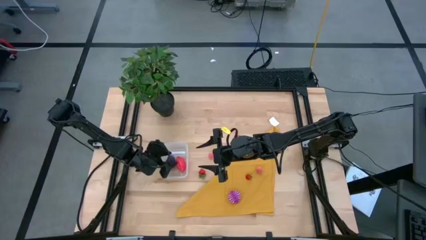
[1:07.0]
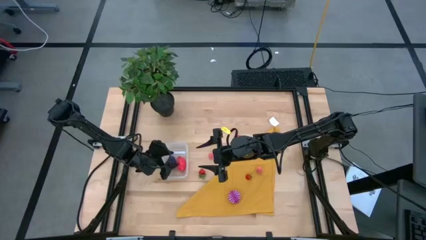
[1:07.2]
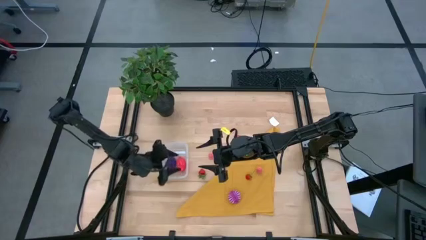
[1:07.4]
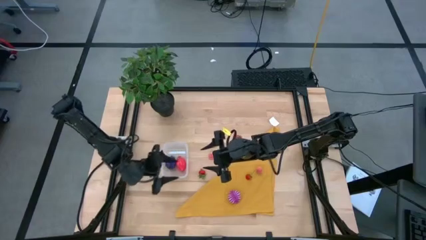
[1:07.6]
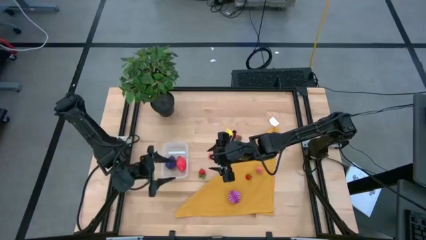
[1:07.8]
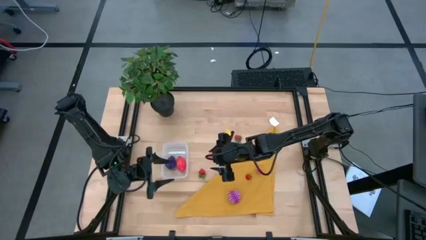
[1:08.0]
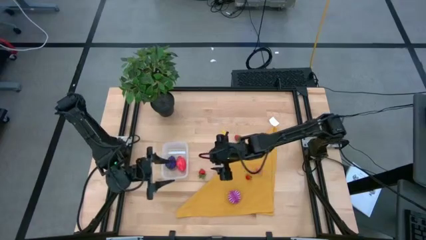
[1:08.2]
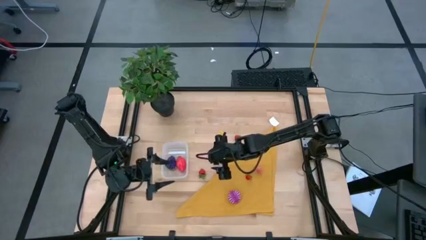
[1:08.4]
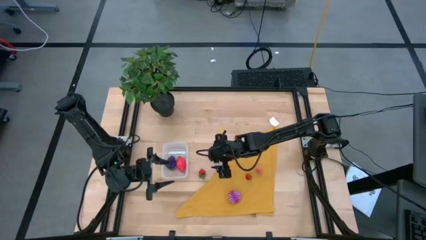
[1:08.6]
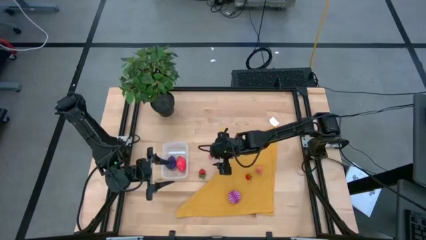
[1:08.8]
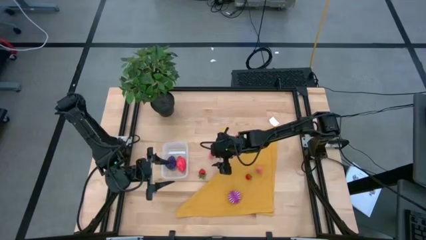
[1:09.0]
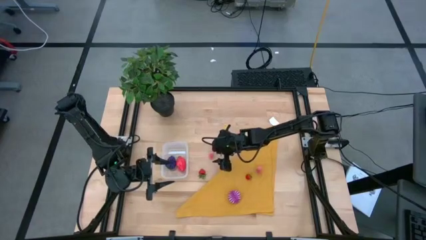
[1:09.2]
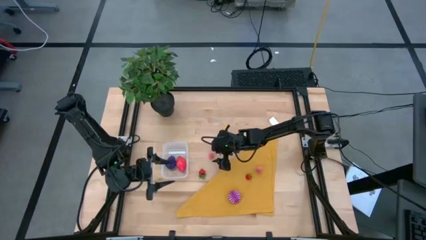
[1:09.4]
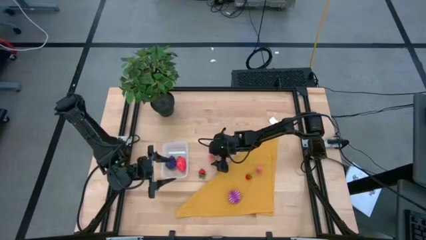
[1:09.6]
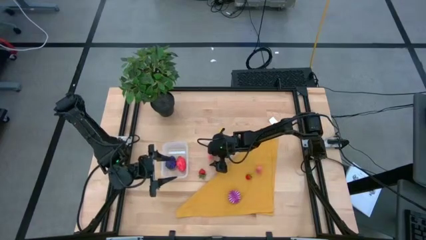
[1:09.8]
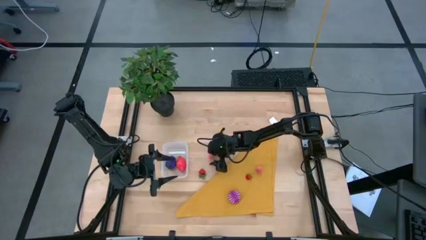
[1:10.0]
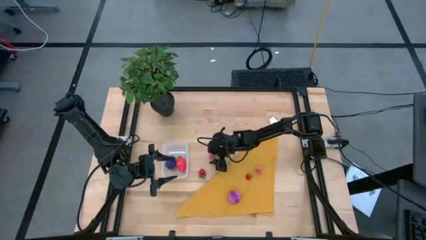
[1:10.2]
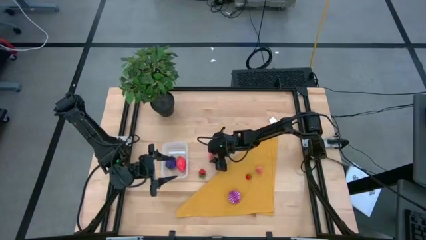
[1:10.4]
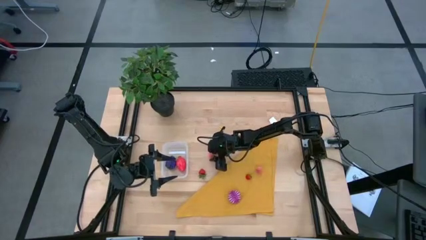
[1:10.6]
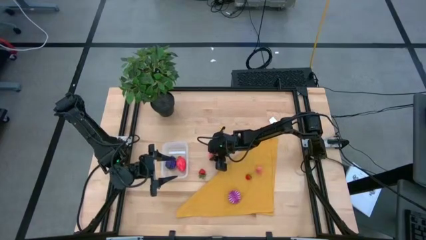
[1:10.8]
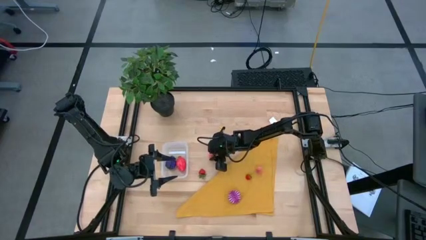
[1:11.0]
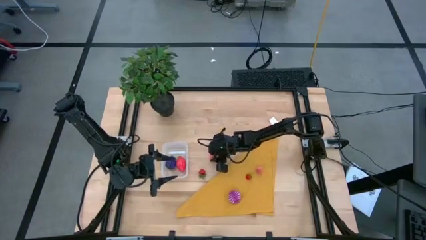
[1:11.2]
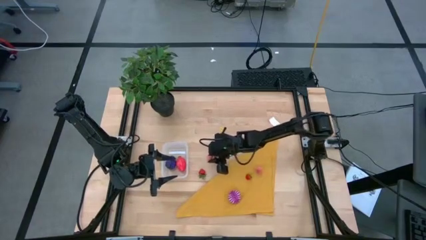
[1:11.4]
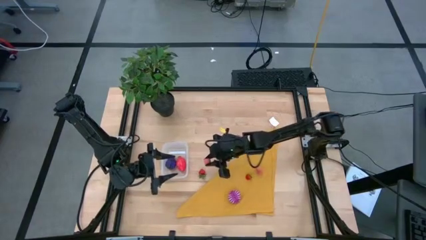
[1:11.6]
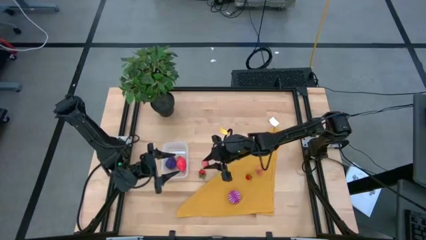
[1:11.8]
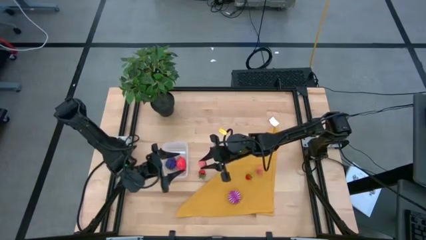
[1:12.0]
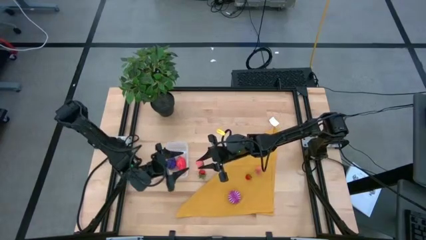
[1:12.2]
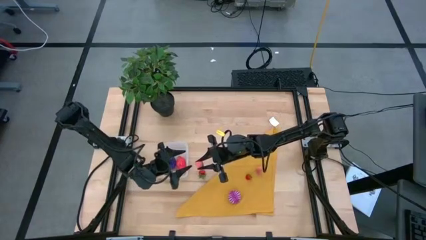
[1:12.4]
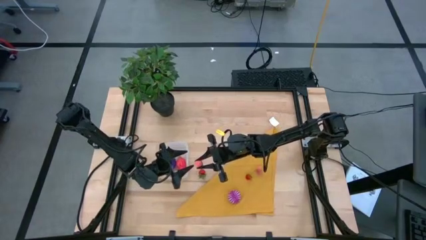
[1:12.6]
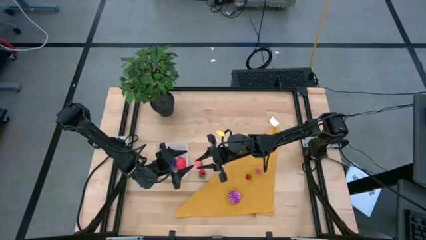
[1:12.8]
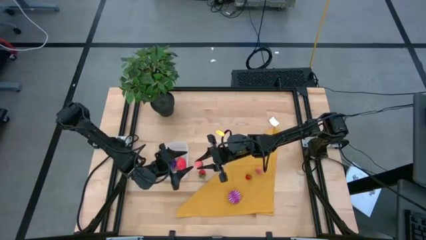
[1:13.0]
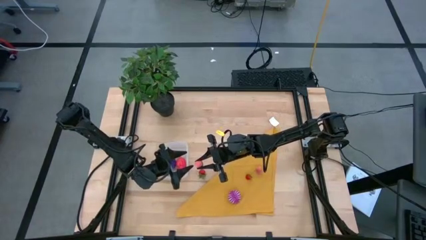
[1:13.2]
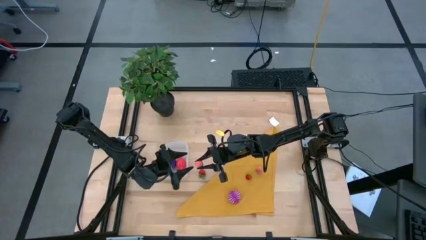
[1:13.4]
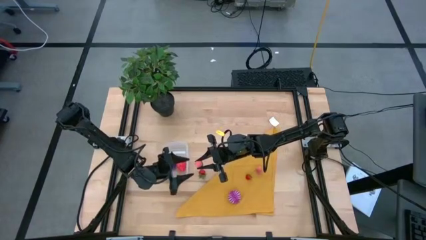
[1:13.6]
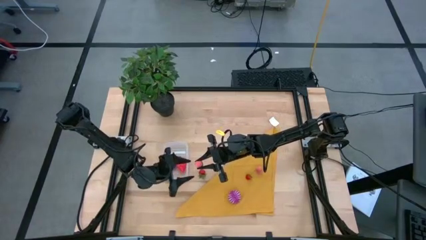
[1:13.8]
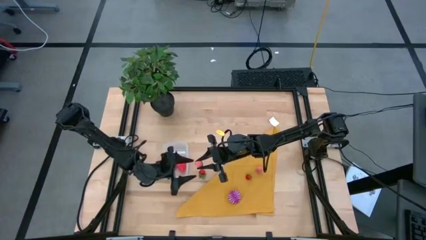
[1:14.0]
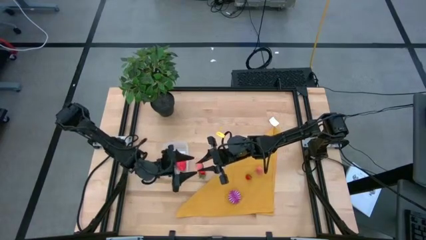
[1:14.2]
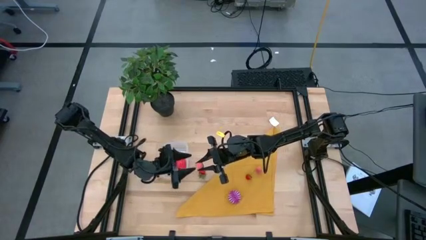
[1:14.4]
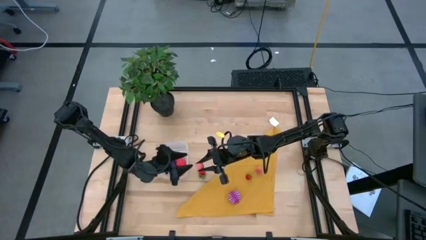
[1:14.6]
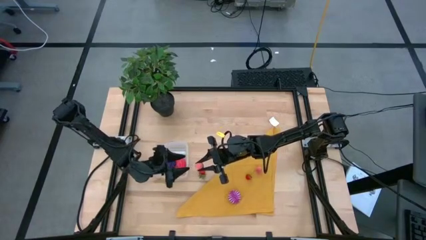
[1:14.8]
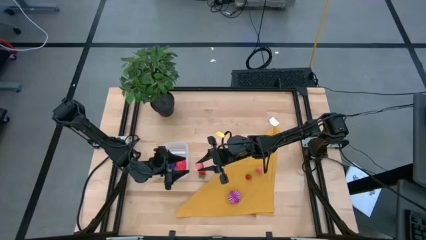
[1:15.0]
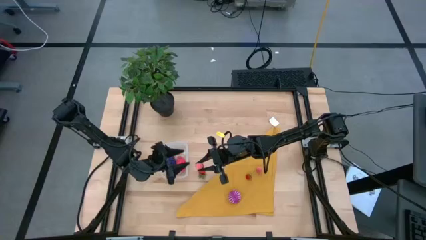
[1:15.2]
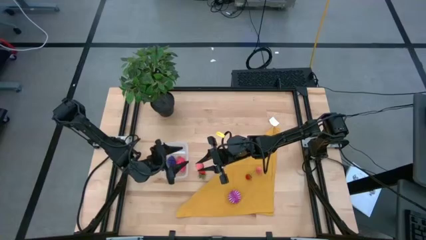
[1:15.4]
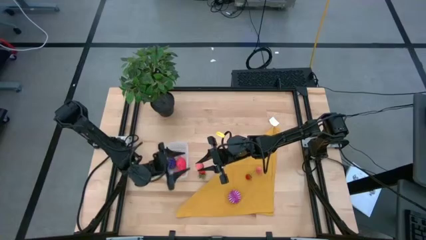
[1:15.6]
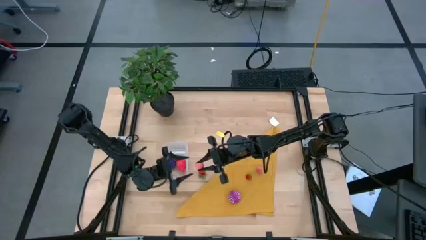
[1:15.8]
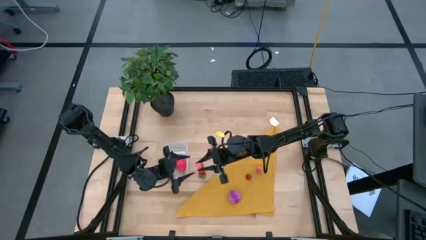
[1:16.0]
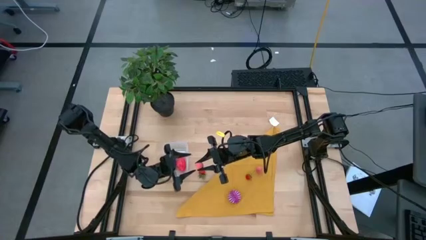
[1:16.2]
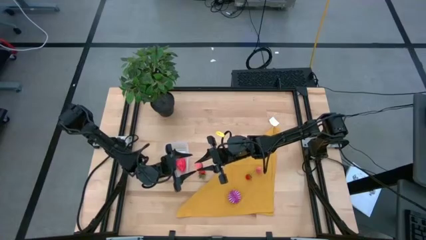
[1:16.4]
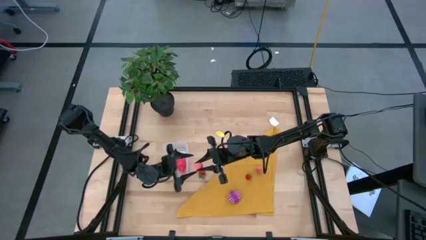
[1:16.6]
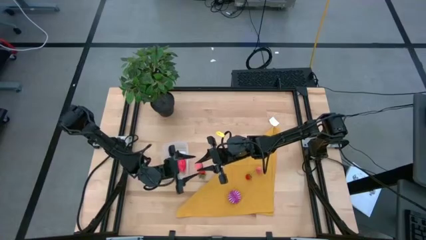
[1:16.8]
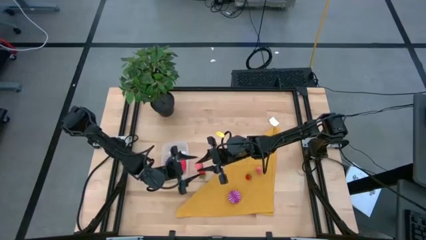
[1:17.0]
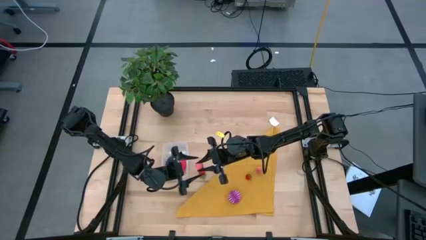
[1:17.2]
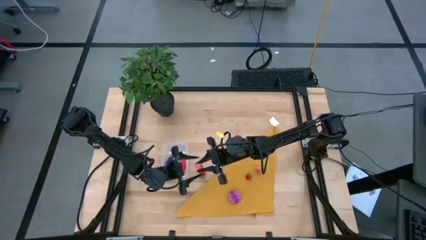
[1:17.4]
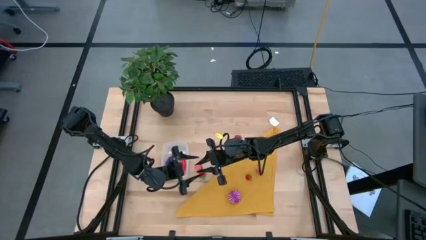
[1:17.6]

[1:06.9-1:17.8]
Task: Pick and placing Produce into tupperware
Put the top pink peach into the transparent bin
